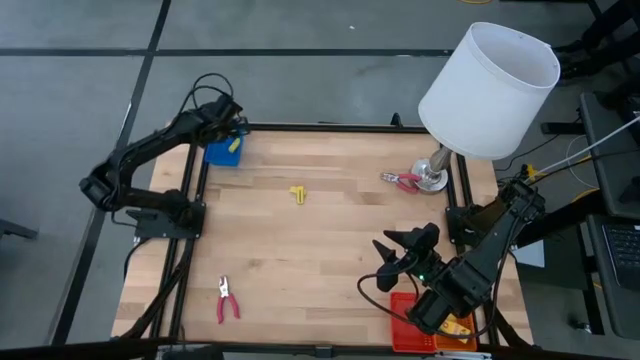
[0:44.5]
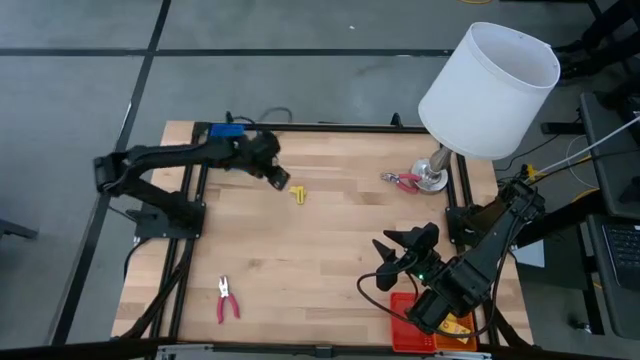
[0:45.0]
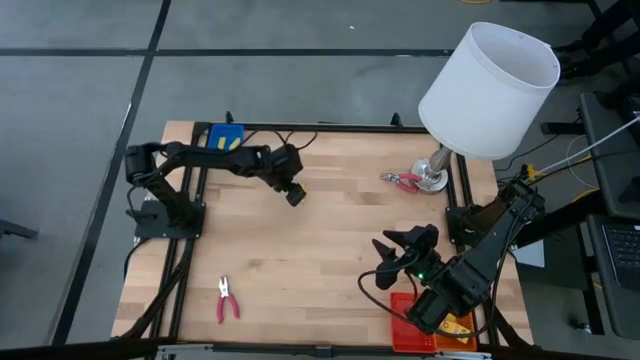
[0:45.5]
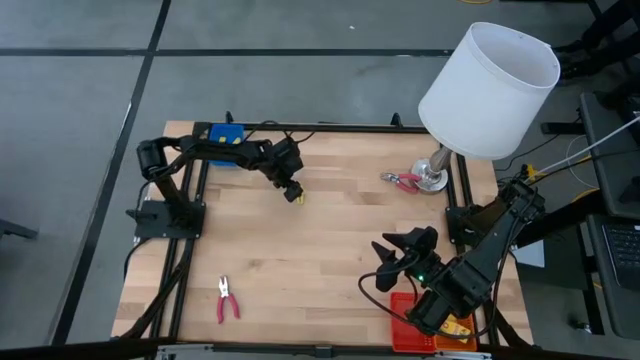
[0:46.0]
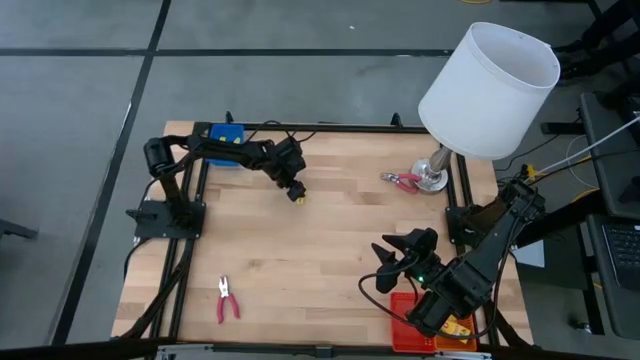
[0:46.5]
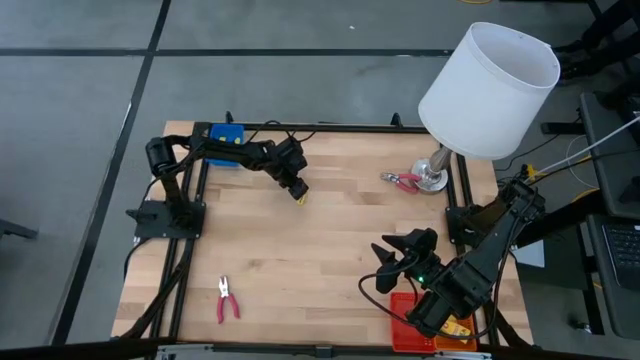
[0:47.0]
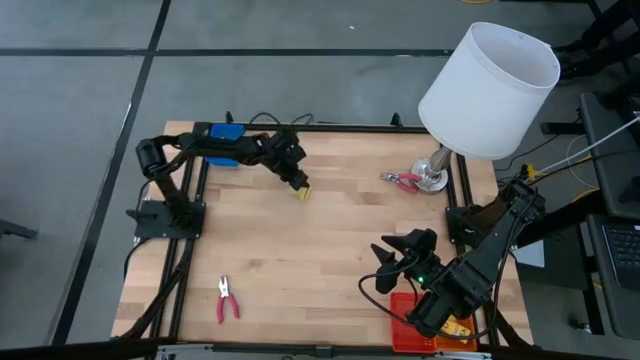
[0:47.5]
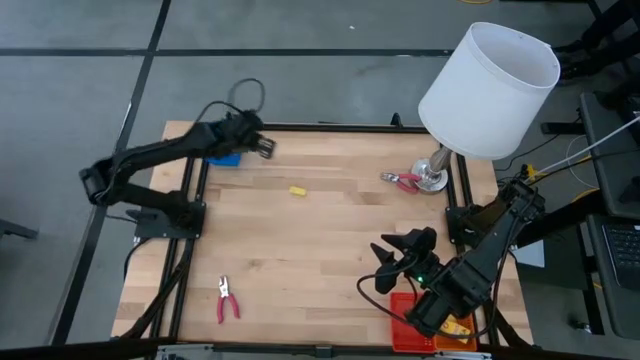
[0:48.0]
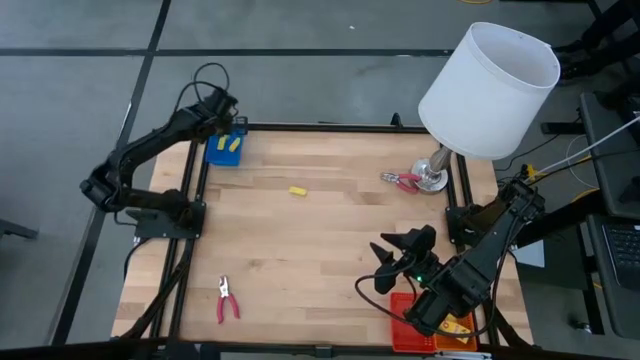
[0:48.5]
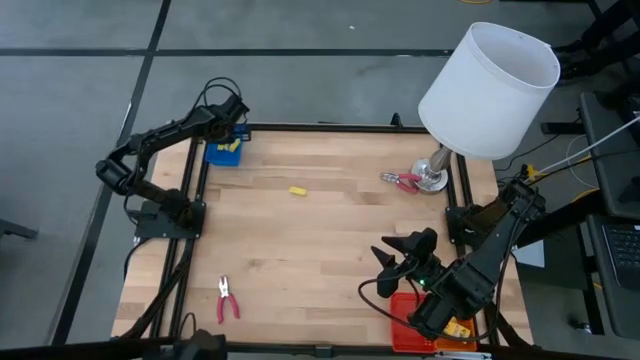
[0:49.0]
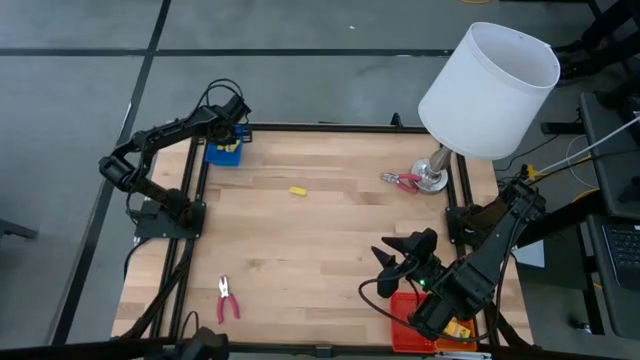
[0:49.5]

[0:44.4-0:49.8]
Task: Pick & Place School Supplies
Put the yellow eraser into the blue bin

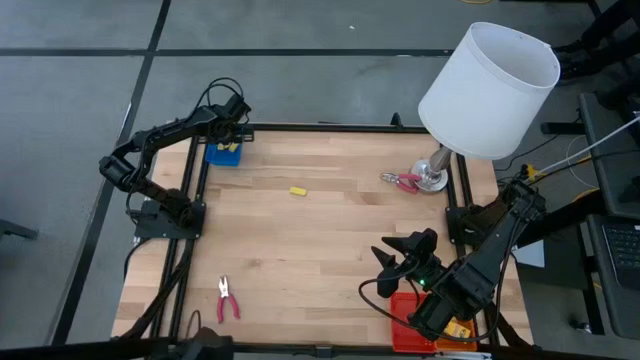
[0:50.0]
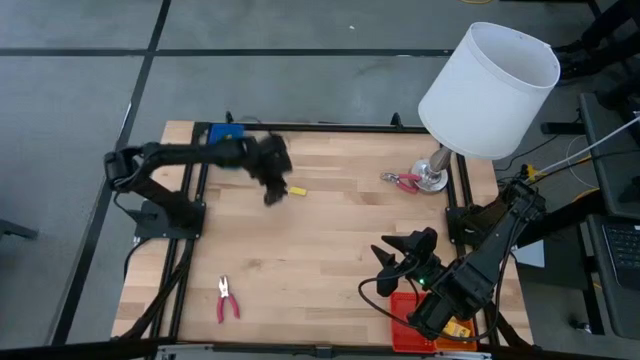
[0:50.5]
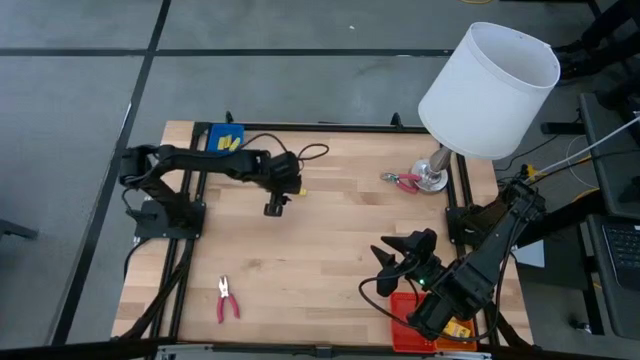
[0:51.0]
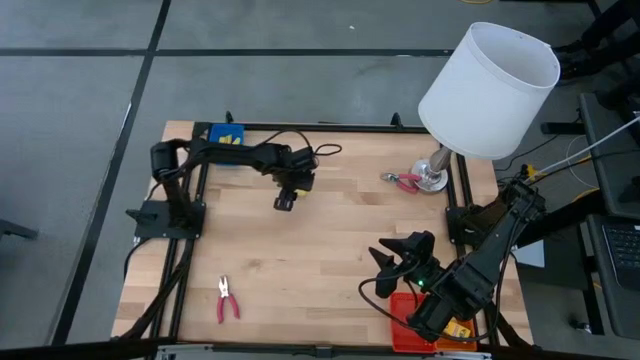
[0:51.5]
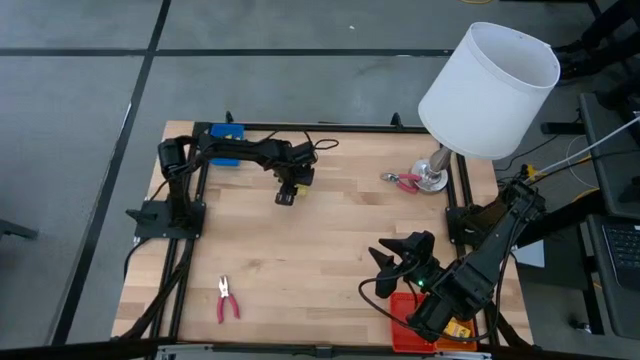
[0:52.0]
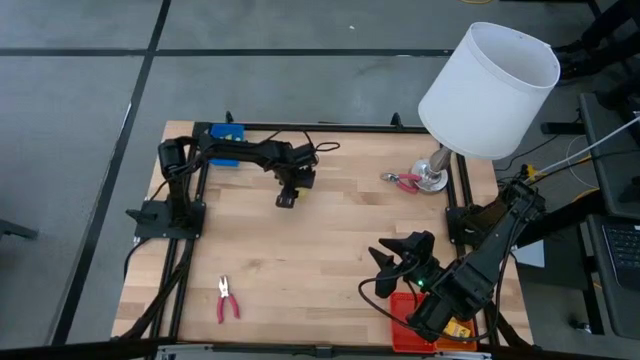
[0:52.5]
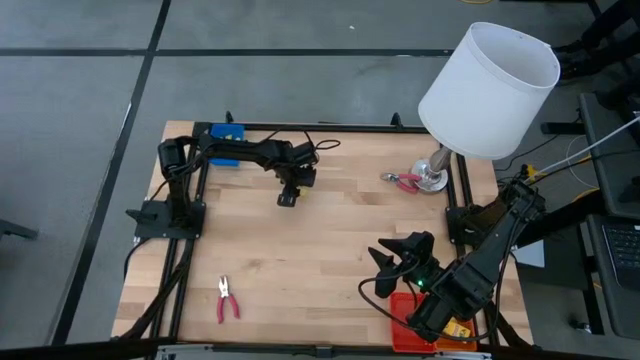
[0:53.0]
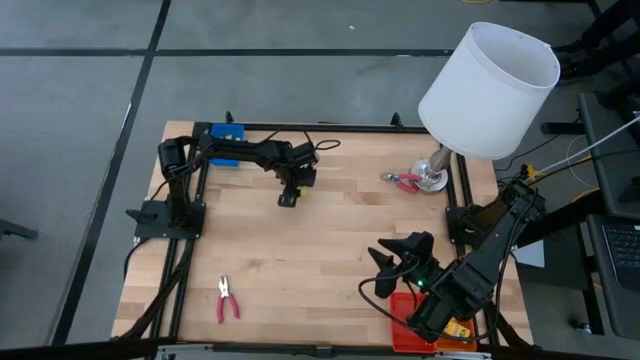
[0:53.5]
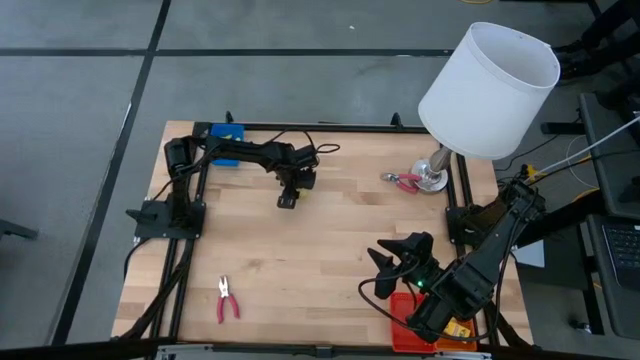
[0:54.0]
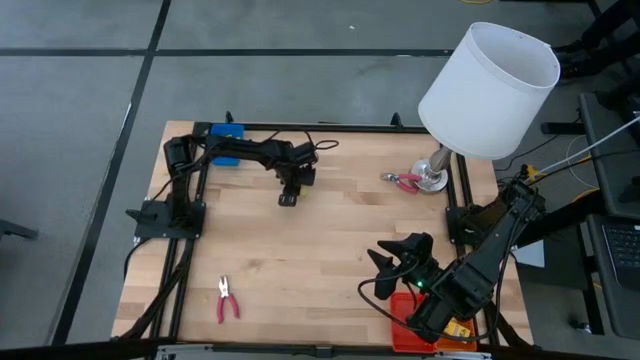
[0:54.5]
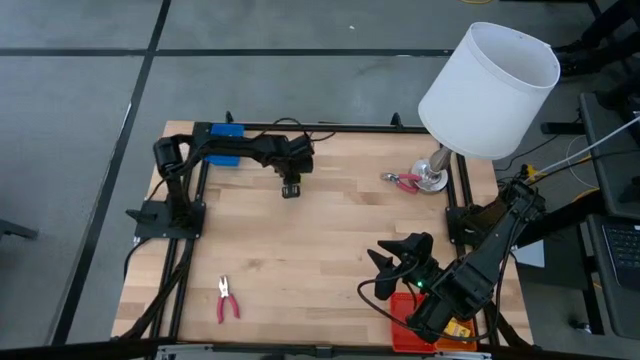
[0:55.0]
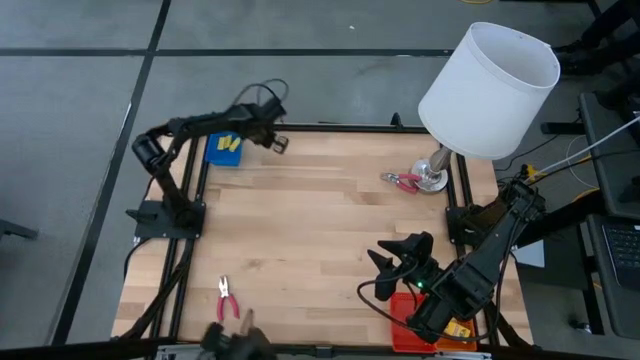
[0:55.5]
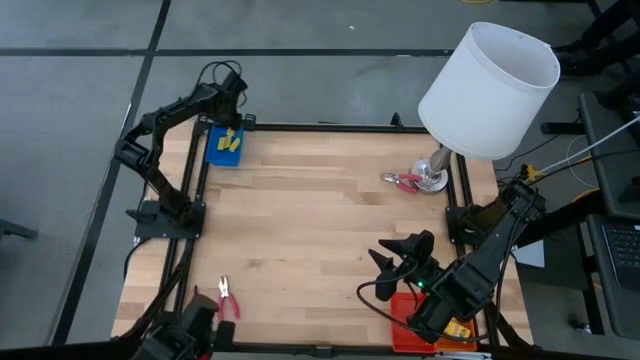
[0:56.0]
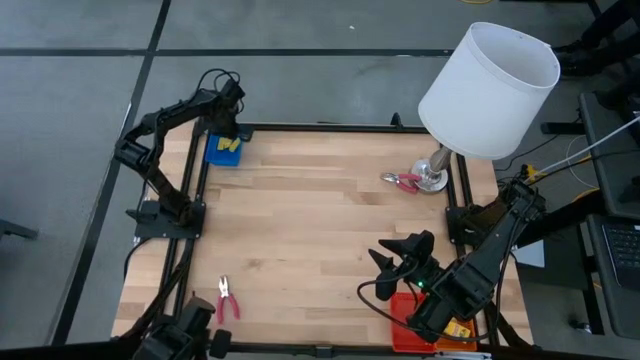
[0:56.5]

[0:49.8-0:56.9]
Put the yellow eraser into the blue bin

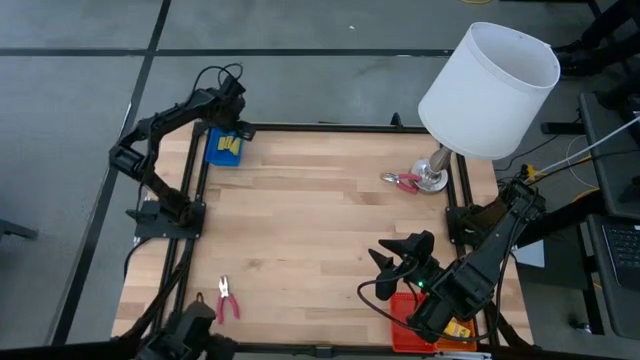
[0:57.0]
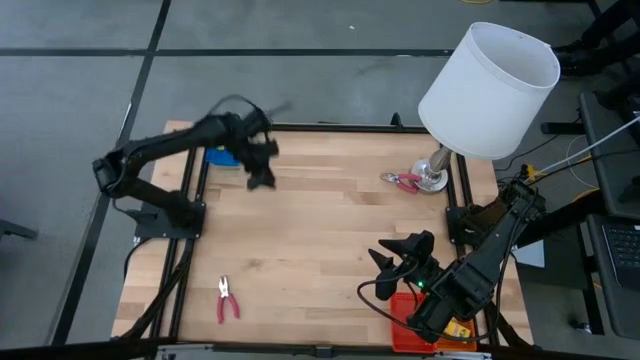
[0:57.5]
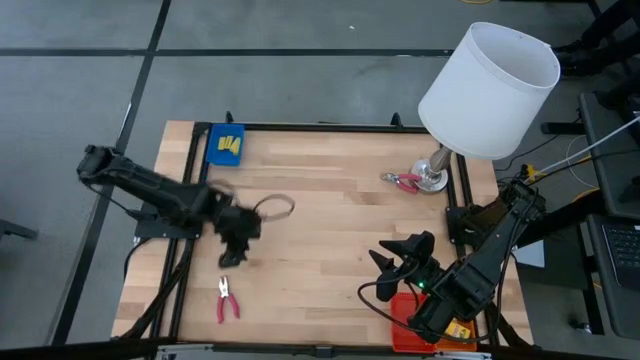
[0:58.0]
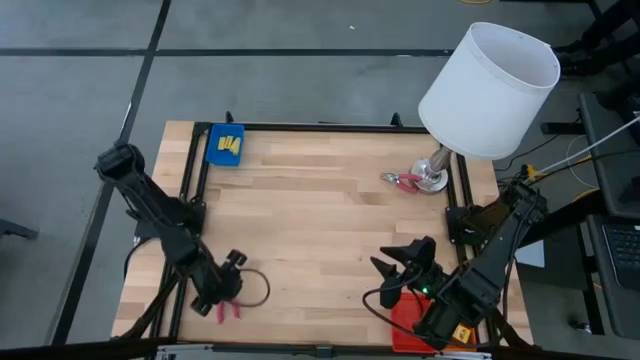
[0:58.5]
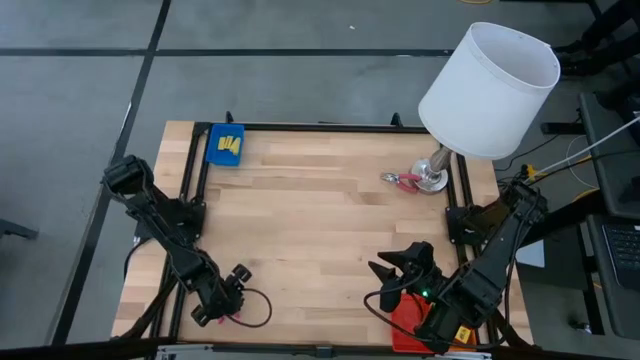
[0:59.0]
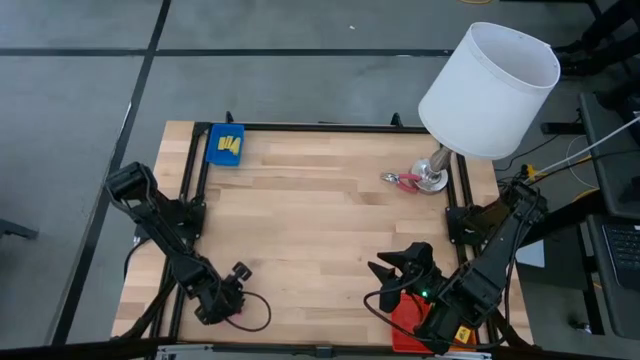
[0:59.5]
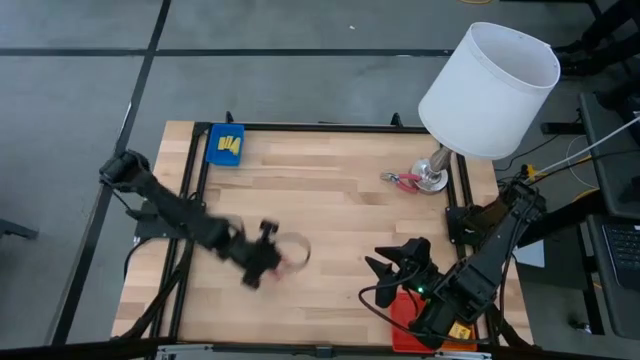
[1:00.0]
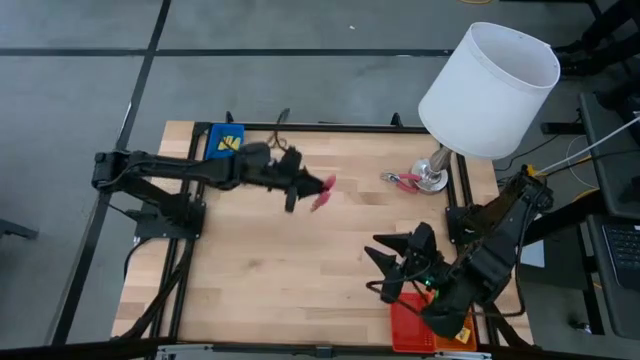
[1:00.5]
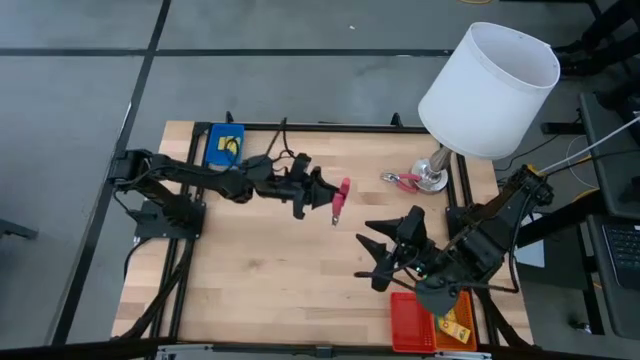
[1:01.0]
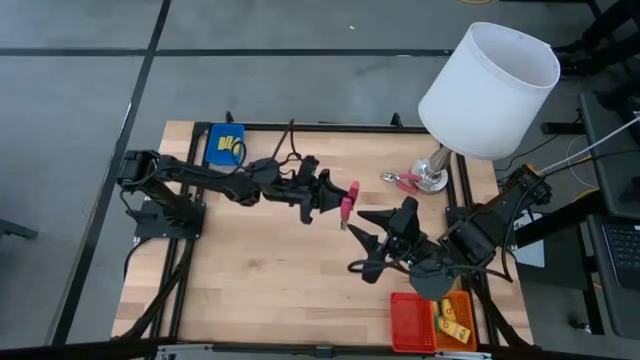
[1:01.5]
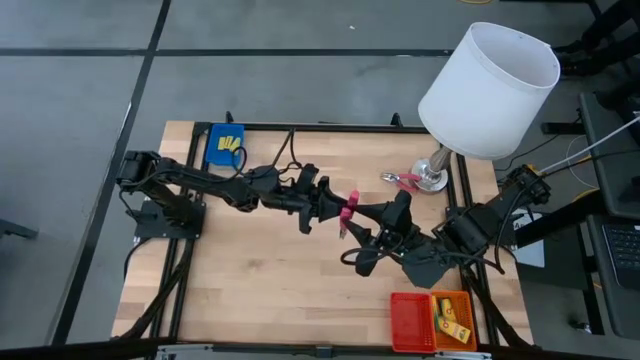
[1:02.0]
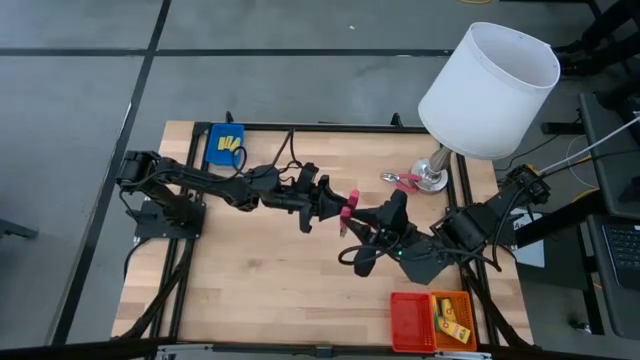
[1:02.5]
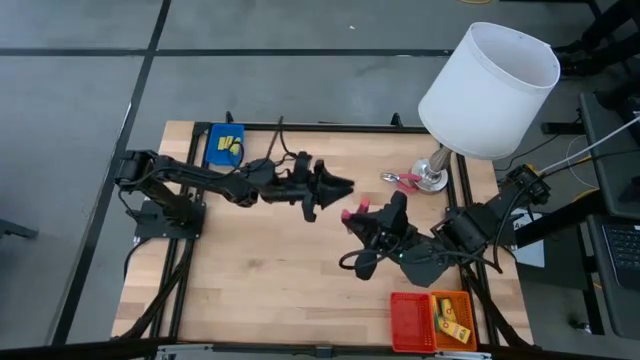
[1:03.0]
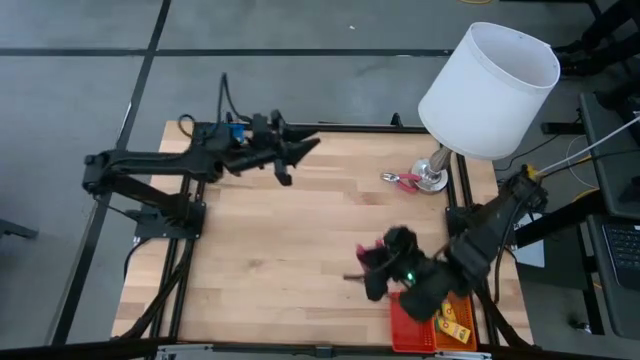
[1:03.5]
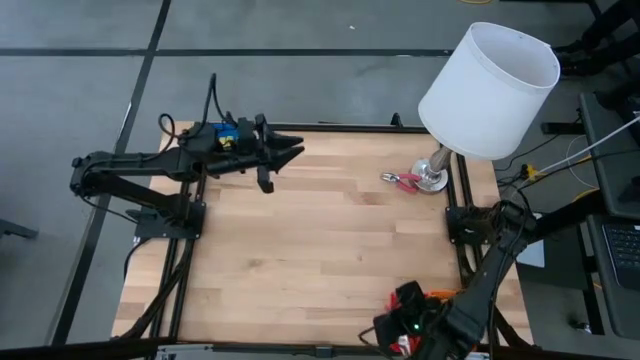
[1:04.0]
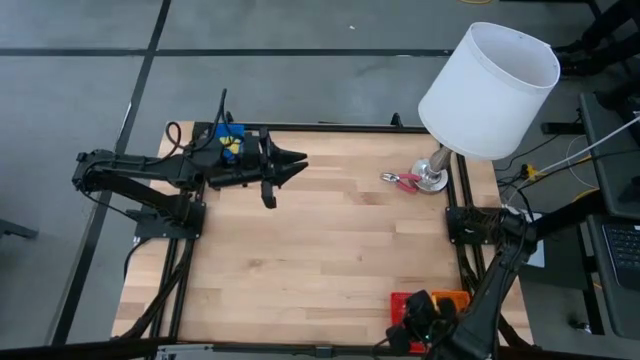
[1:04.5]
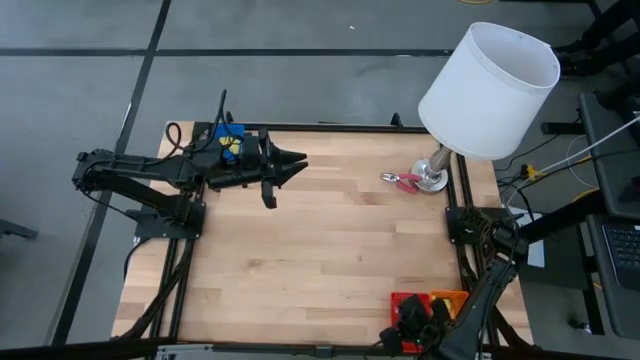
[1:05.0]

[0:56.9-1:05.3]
Put the pink hole puncher into the red bin

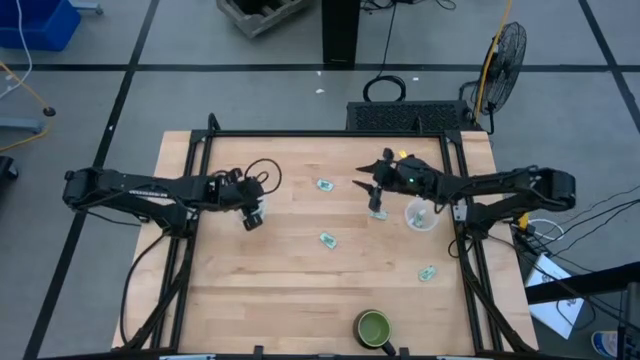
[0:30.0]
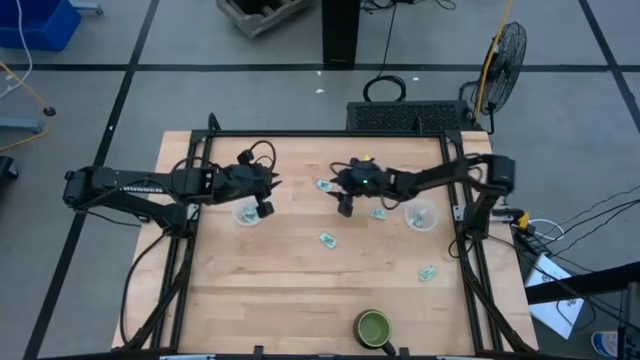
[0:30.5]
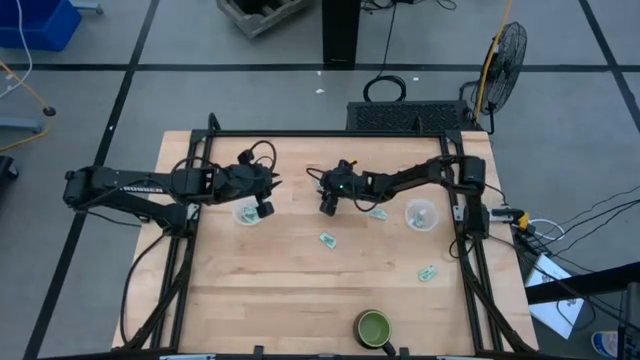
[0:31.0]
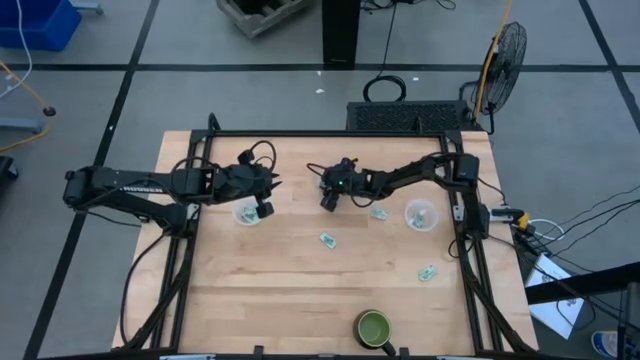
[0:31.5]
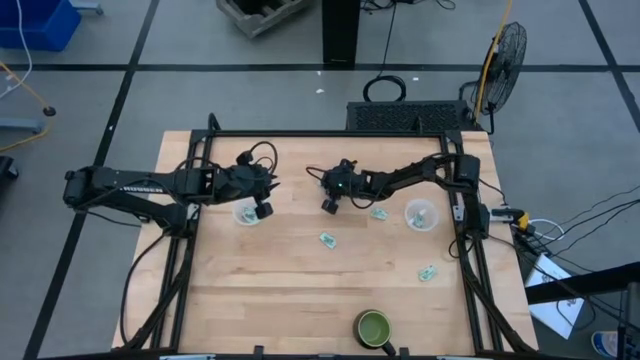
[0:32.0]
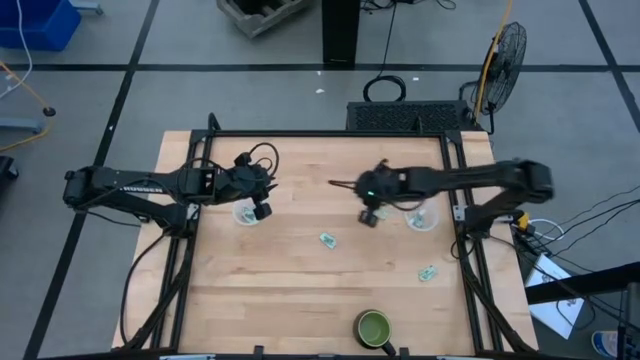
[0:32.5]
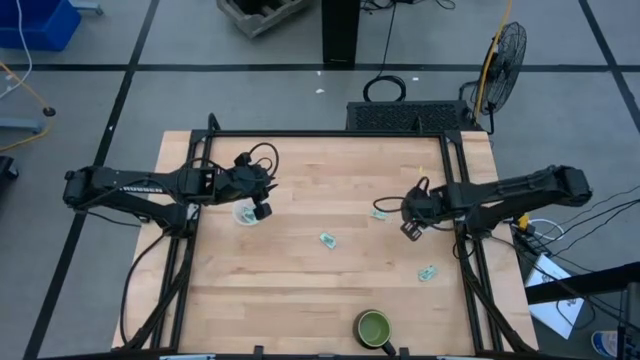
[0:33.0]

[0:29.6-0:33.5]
Task: Pick and place Stevia / Truvia into bins
Put the stevia packet into the right transparent container
